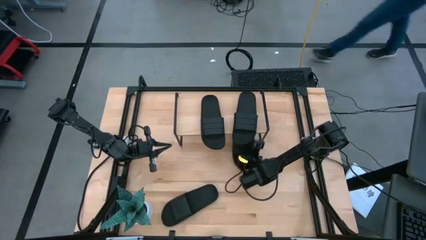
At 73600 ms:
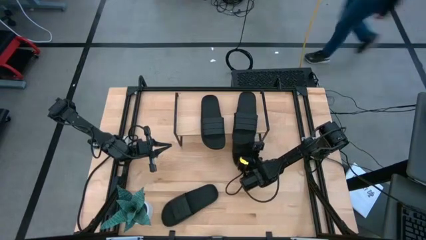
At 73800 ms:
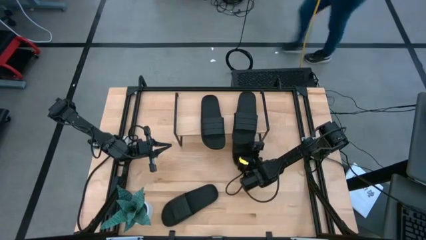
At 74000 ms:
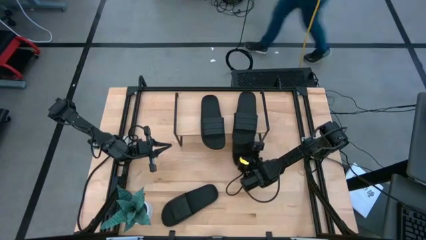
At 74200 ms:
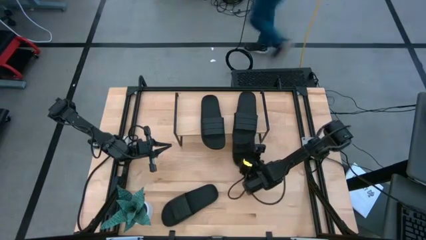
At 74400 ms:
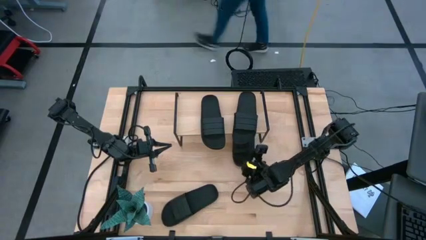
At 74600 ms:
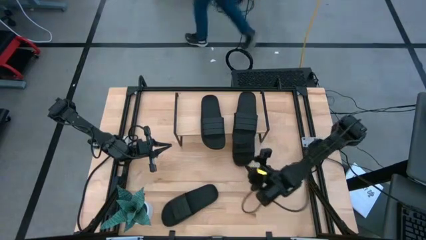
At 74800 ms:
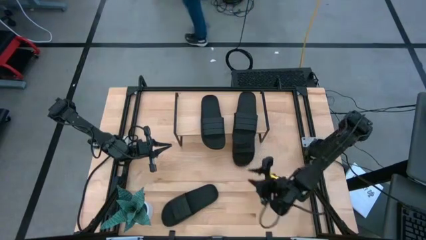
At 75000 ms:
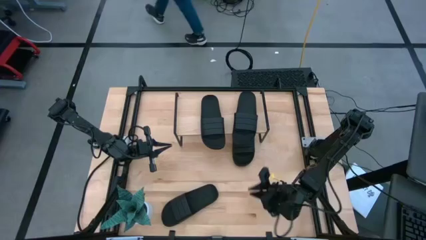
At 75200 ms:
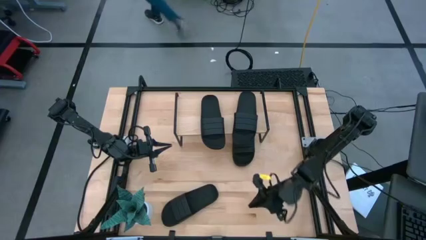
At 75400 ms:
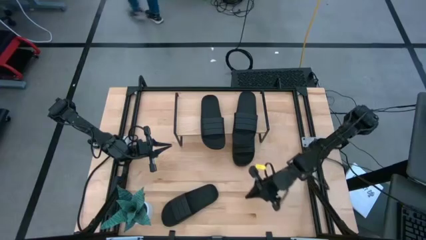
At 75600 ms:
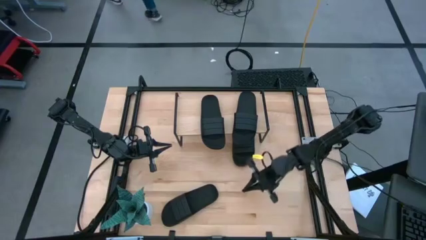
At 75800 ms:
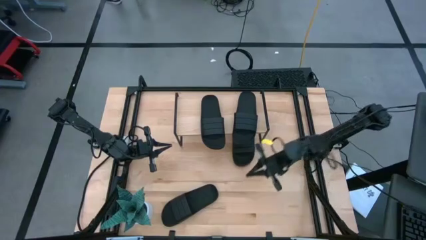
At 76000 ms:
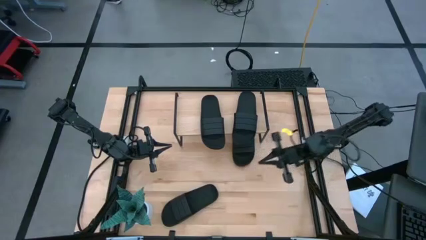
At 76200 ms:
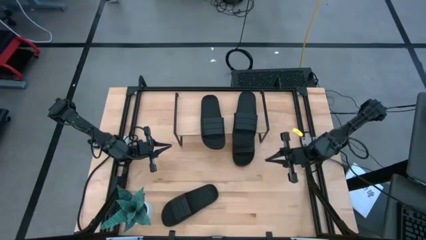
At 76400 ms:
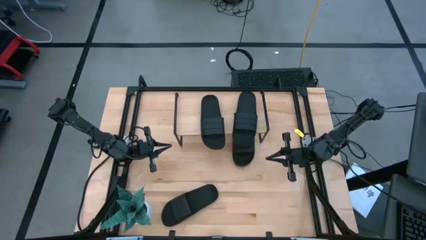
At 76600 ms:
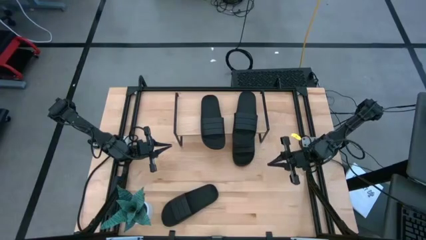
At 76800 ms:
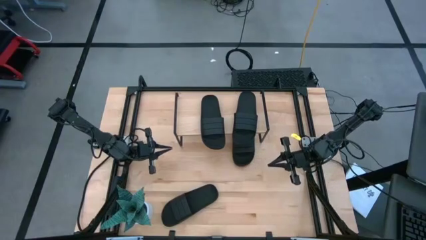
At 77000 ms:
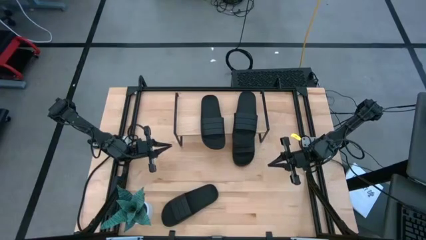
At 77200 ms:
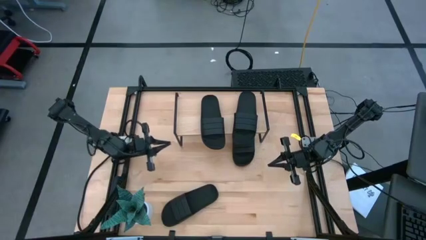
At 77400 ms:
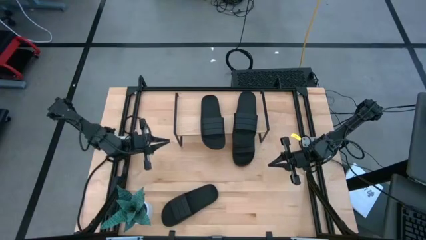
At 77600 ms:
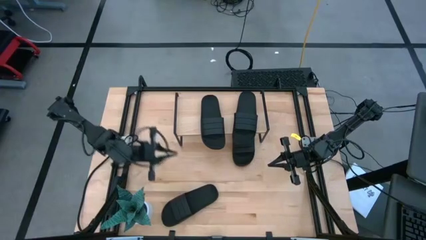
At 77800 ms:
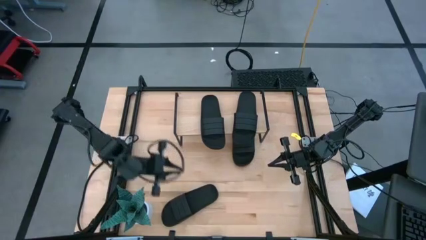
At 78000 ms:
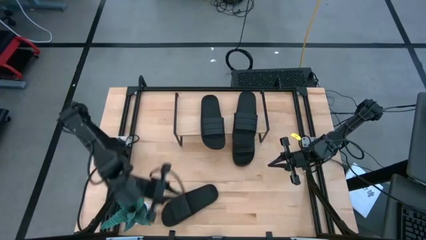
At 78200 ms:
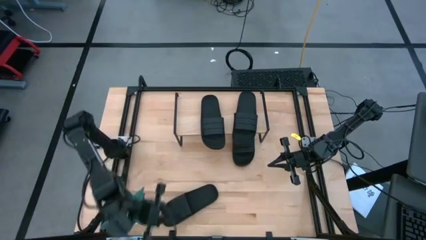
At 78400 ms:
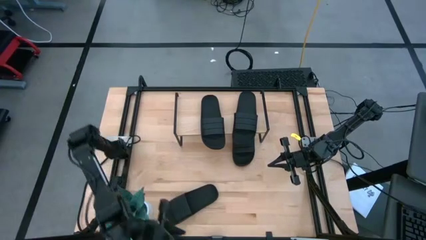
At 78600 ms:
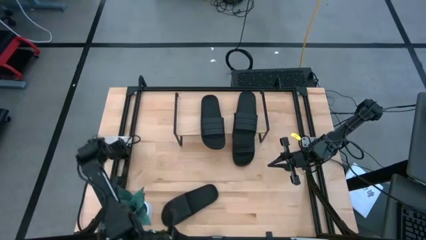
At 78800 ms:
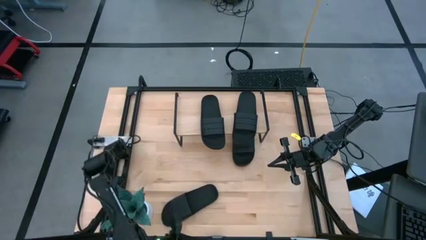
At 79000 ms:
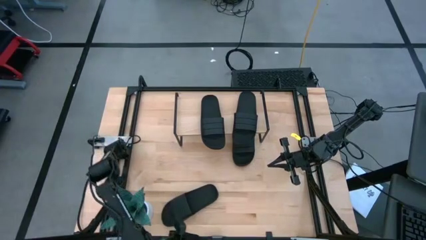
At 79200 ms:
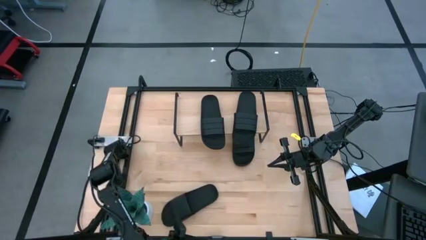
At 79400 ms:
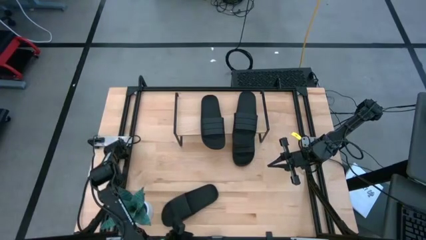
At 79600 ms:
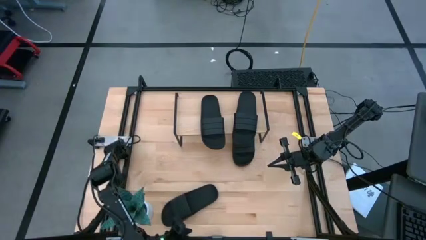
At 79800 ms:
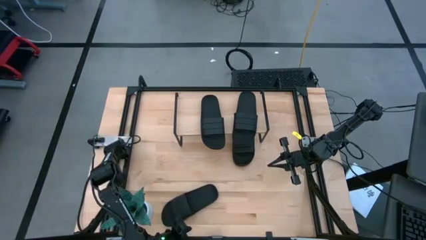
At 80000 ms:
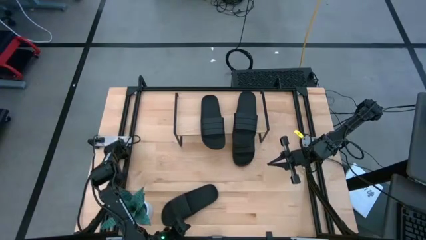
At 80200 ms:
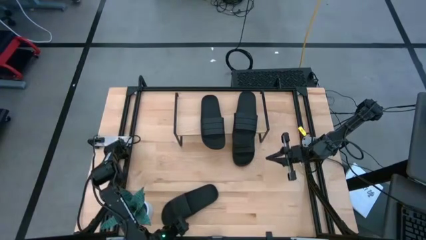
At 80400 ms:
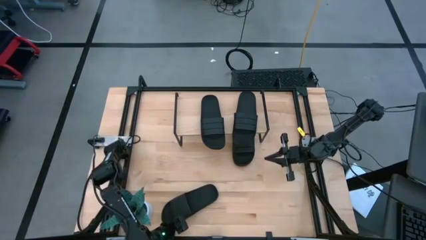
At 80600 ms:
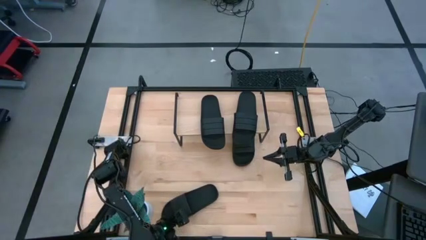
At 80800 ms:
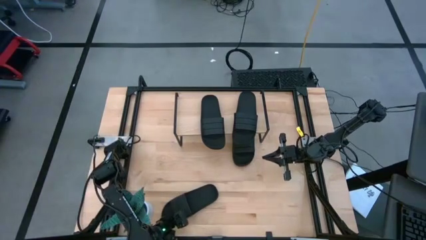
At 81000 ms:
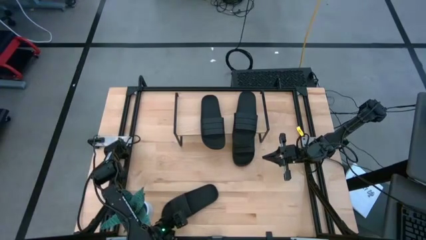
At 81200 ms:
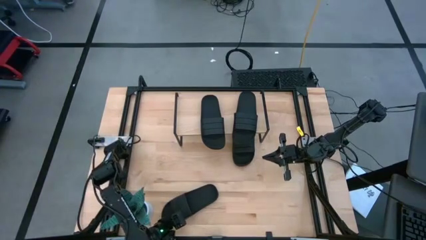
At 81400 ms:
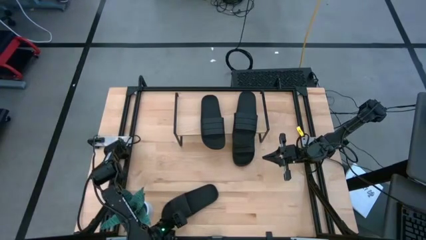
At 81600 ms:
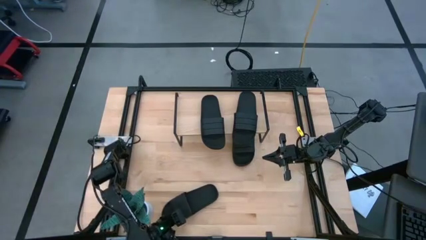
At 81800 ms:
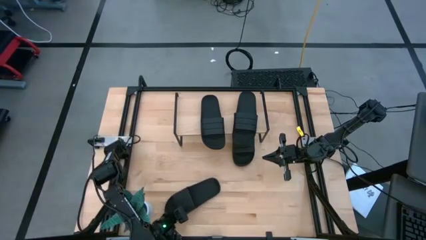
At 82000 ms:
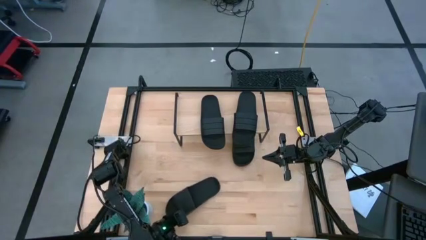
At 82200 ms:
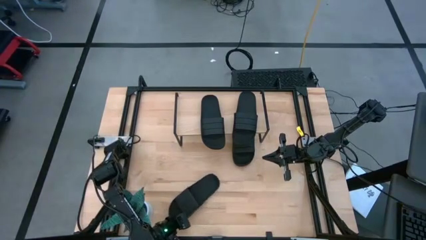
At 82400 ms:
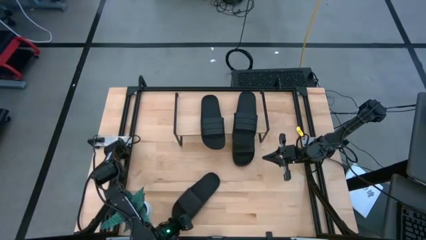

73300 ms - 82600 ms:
Task: Pick and place slides into the shelf
Put the black slide under the shelf
